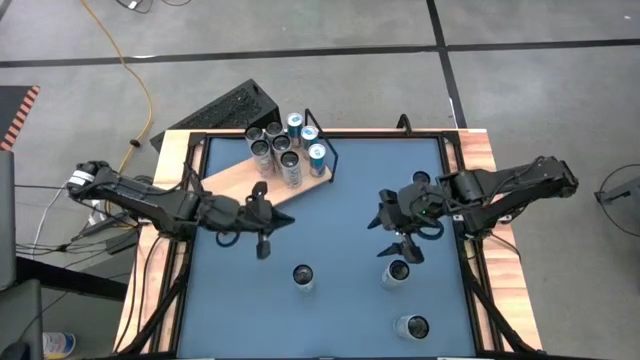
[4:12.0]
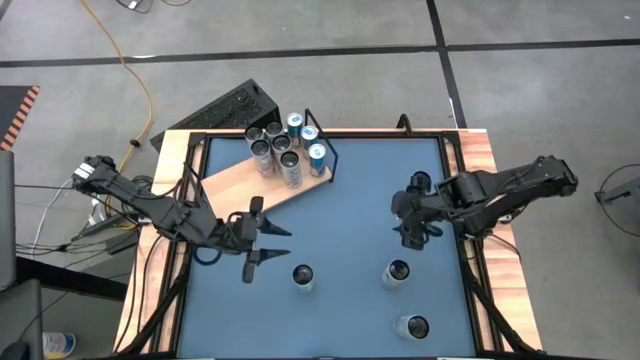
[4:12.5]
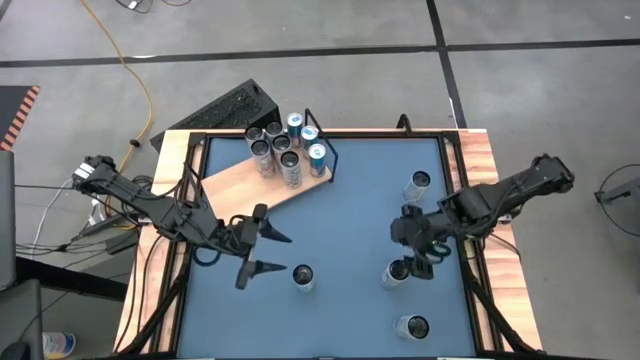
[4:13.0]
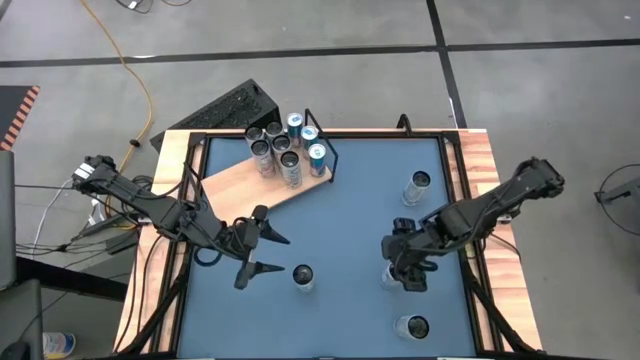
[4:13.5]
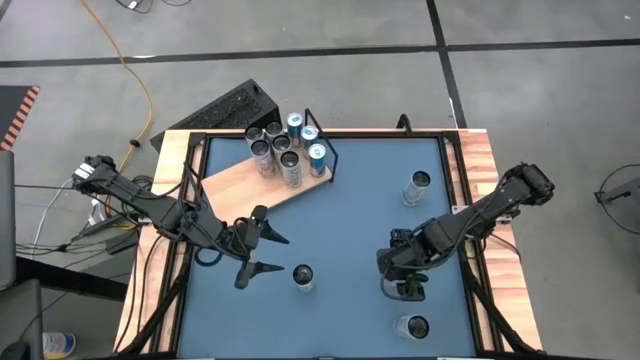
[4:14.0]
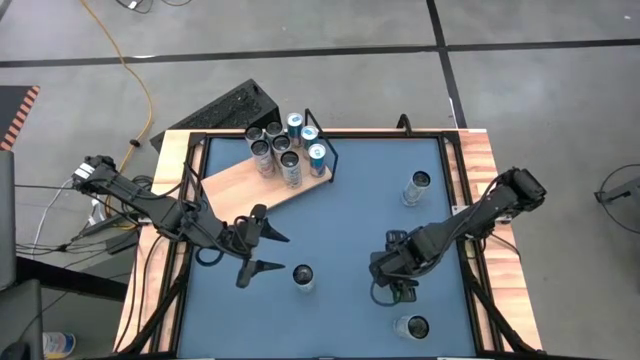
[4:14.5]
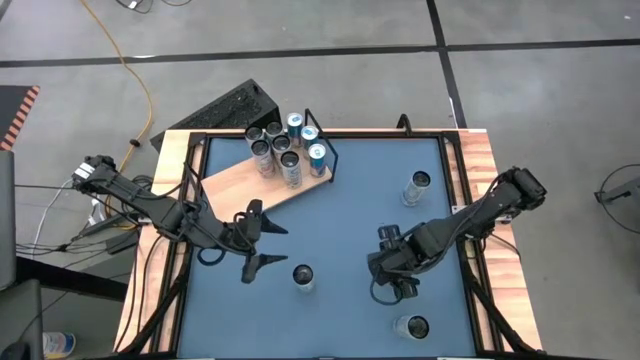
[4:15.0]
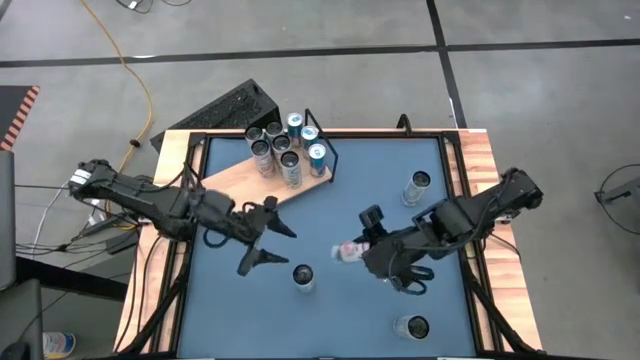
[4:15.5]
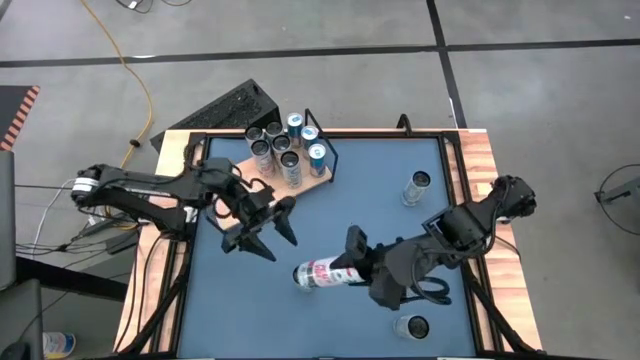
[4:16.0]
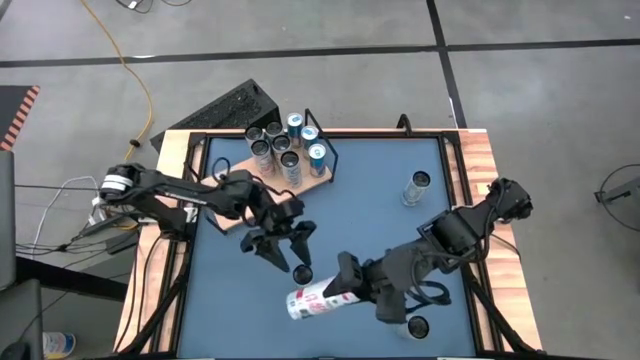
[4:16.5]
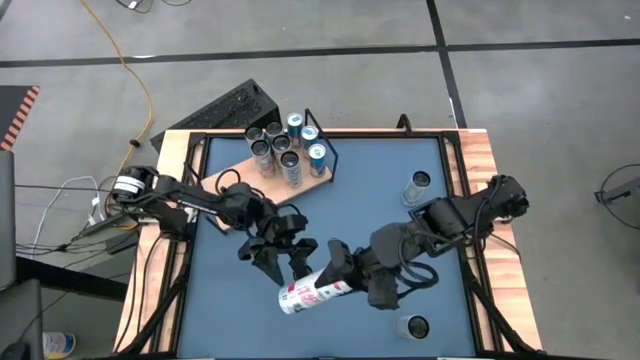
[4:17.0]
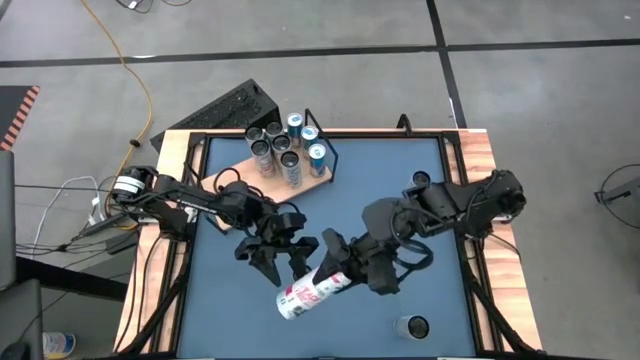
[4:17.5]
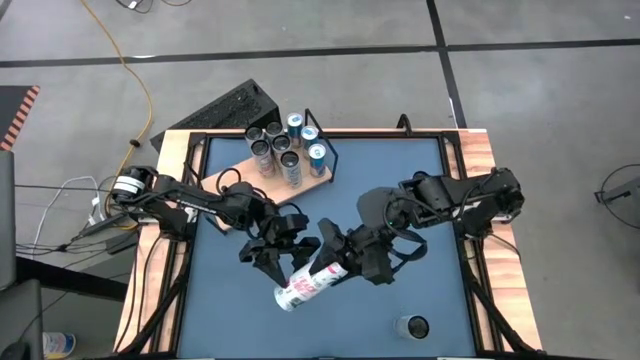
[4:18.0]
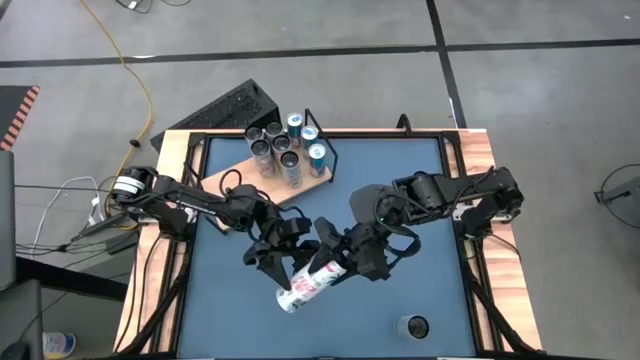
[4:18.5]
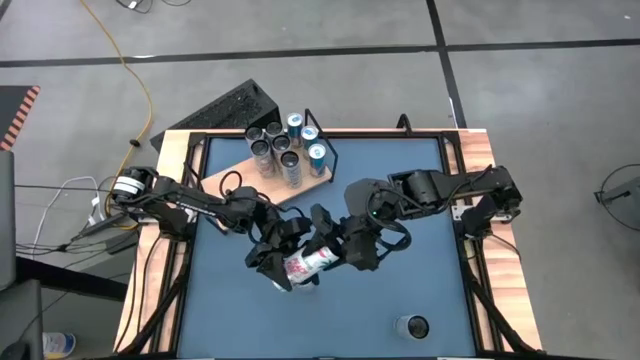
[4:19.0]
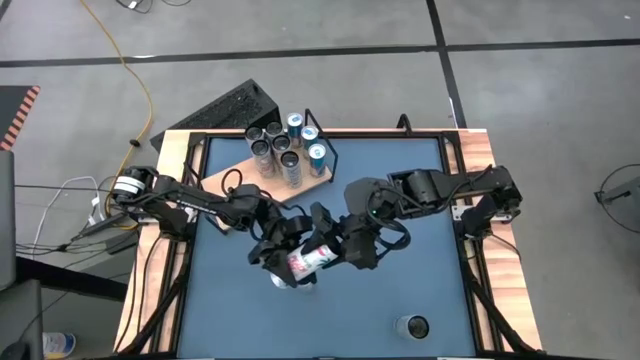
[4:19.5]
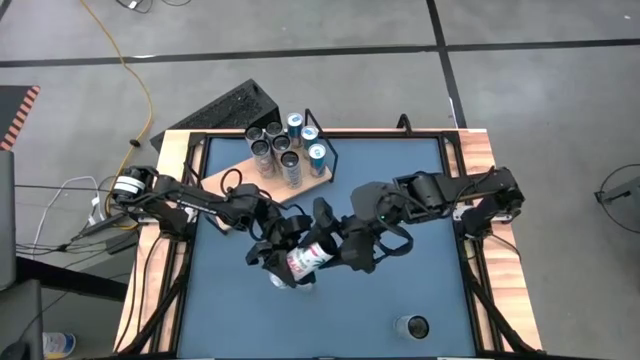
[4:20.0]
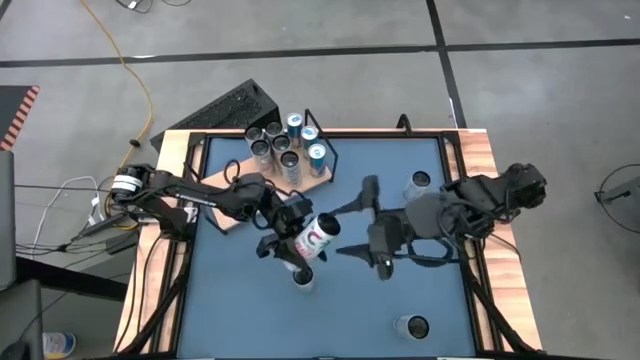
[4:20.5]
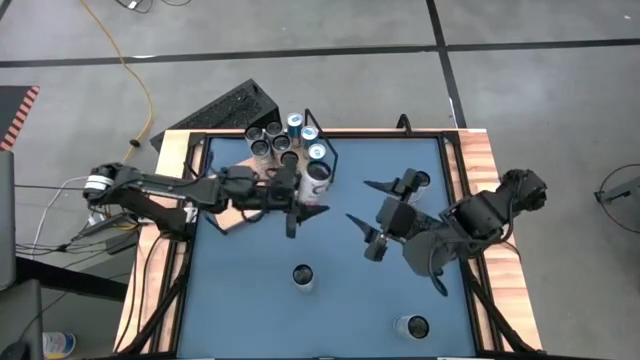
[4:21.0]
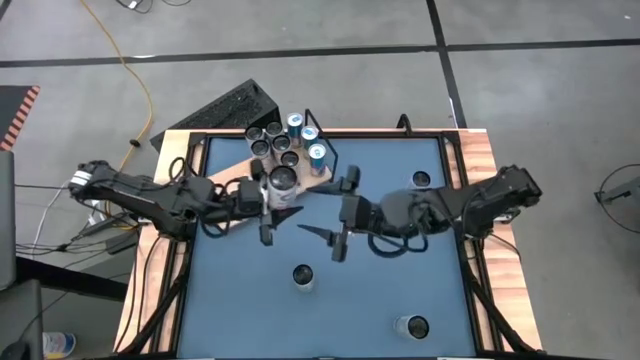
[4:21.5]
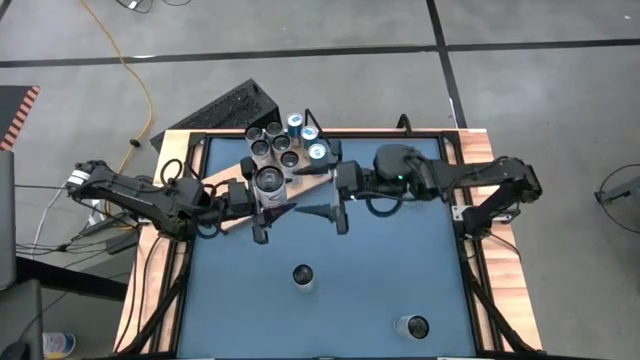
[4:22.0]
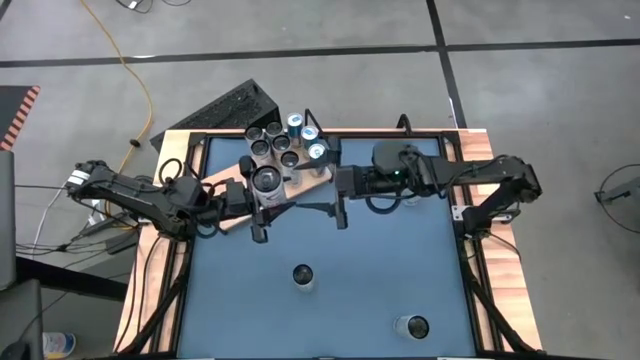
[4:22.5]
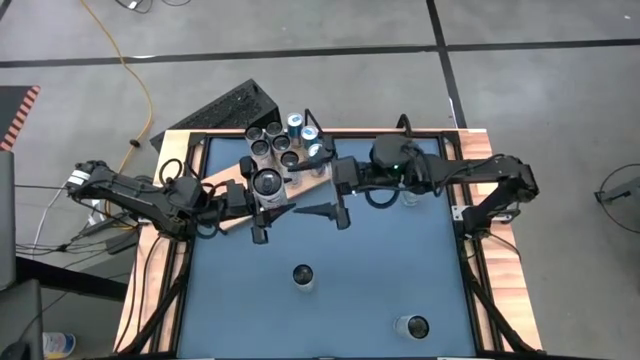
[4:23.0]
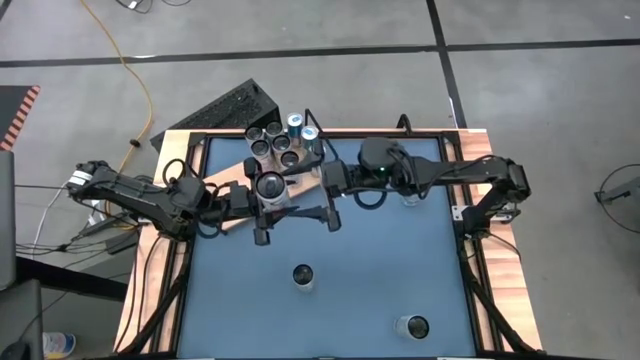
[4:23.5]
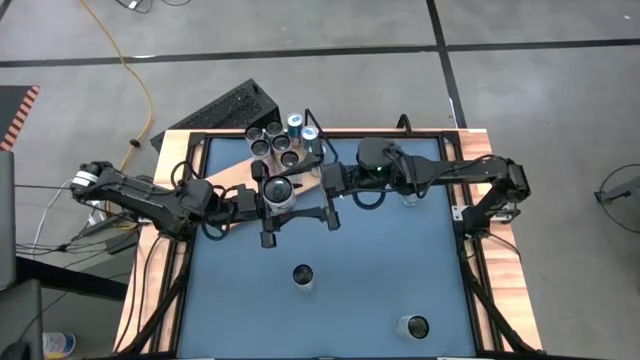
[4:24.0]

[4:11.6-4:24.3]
Task: Place canned beverage on shelf
Put the white and pink soda can on the shelf aligned with the other white and pink soda cans

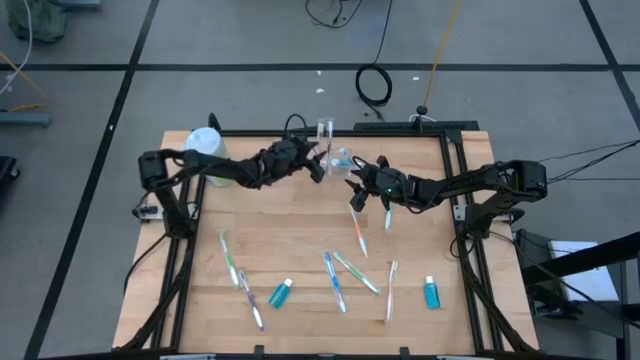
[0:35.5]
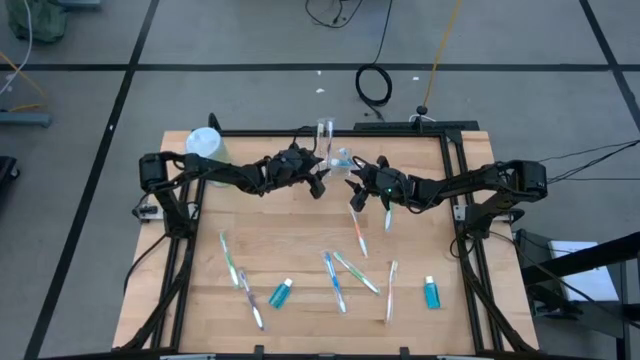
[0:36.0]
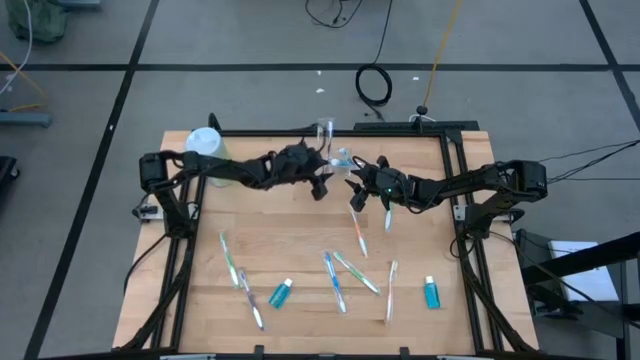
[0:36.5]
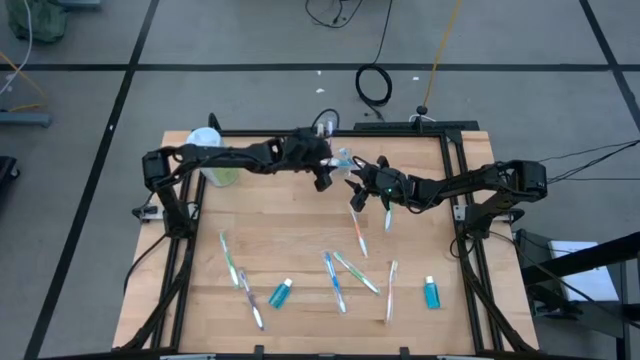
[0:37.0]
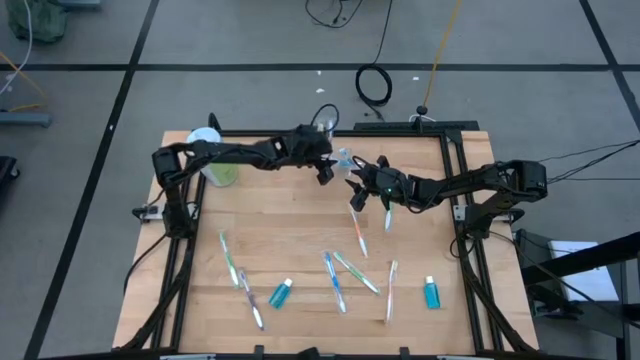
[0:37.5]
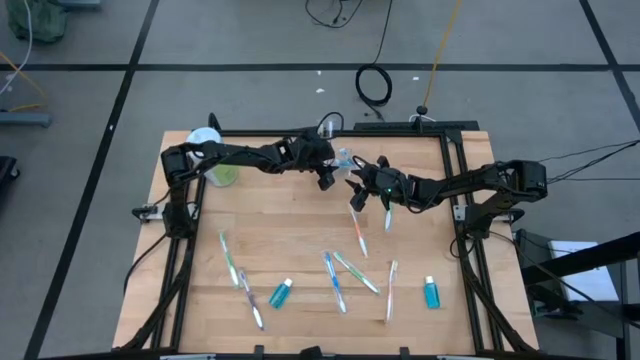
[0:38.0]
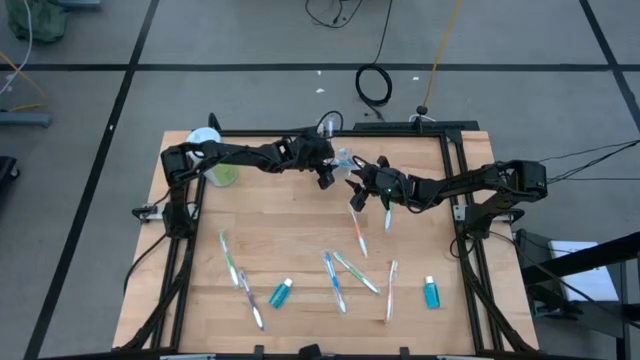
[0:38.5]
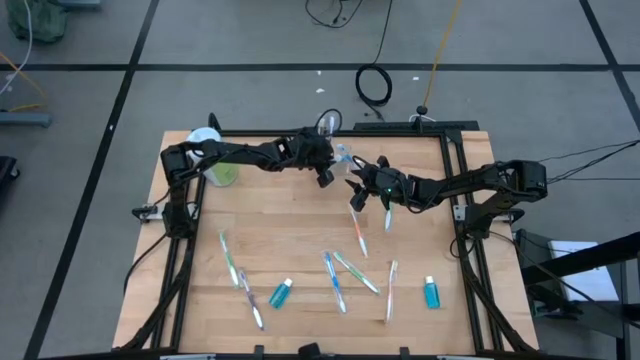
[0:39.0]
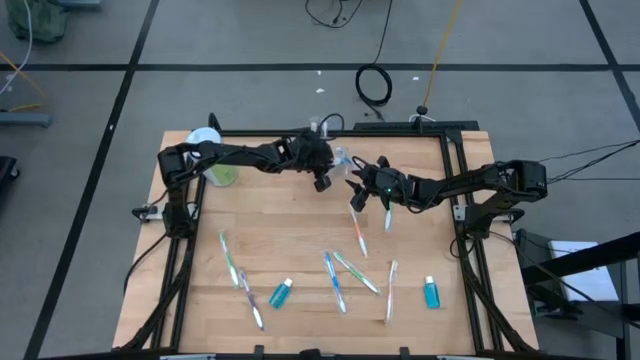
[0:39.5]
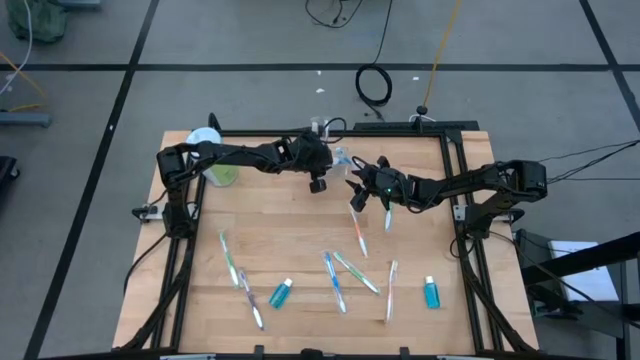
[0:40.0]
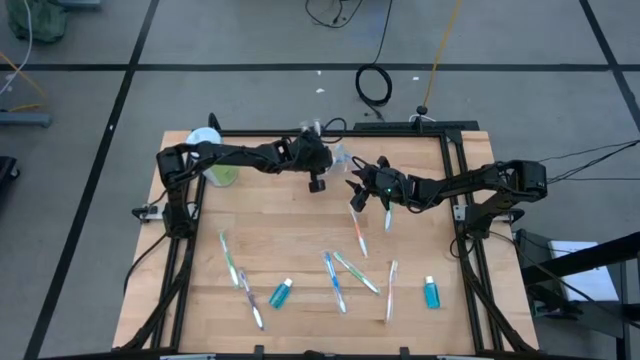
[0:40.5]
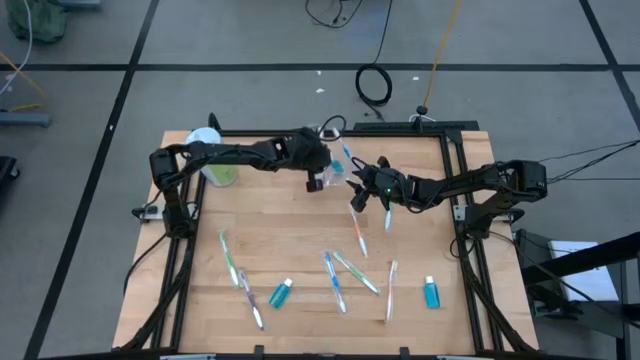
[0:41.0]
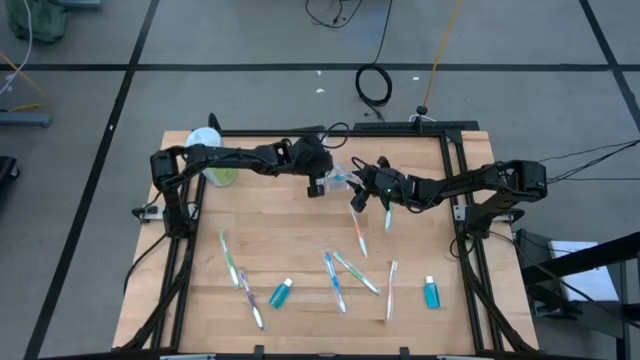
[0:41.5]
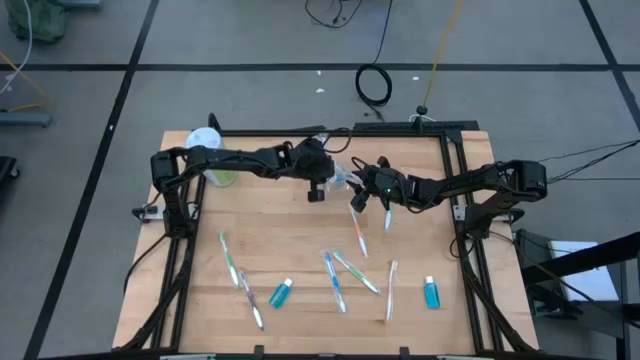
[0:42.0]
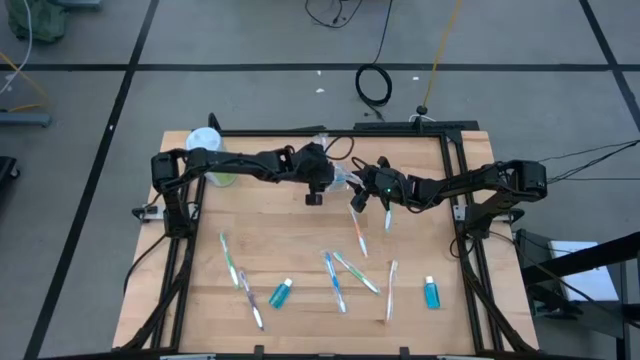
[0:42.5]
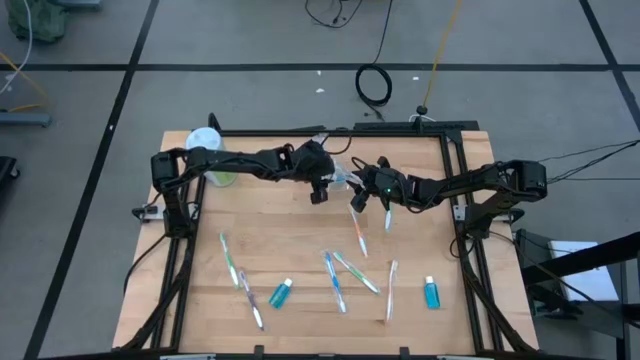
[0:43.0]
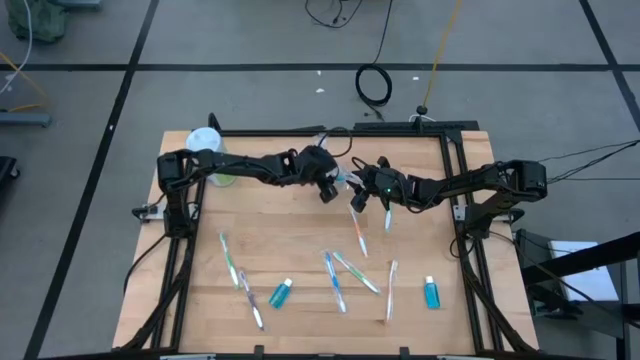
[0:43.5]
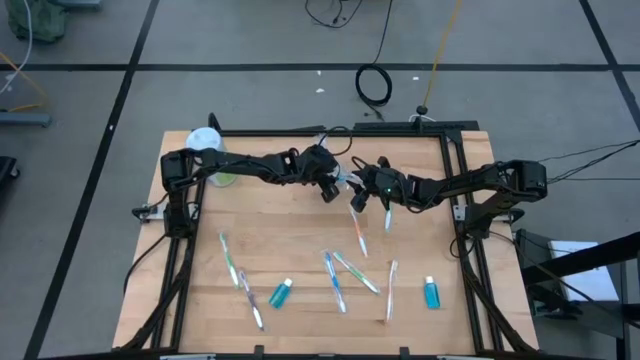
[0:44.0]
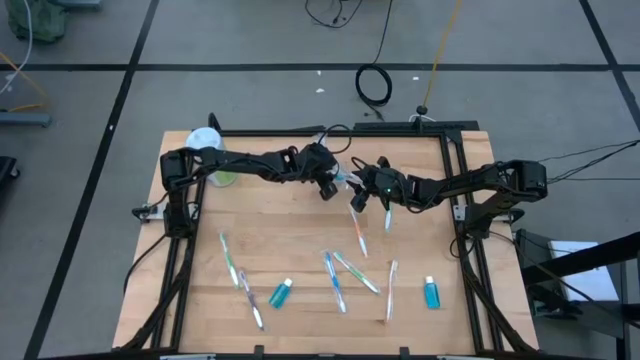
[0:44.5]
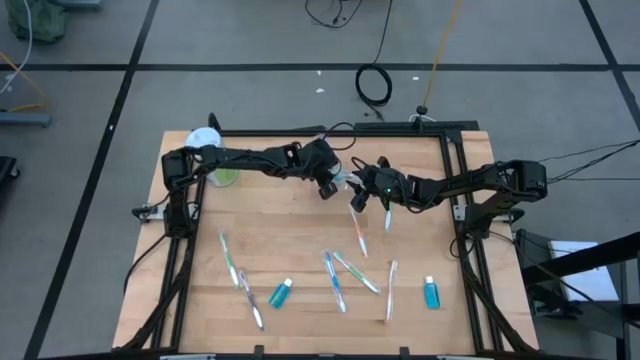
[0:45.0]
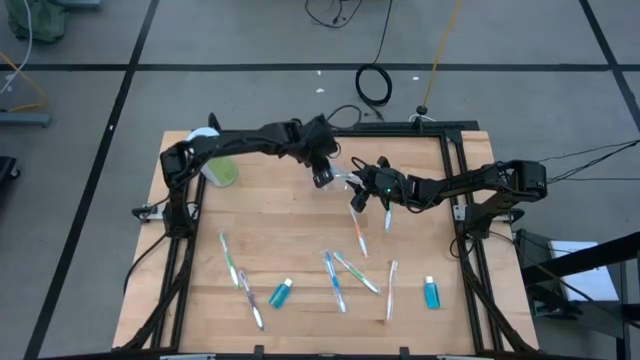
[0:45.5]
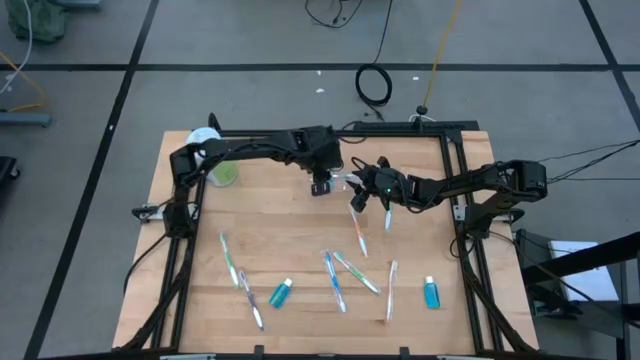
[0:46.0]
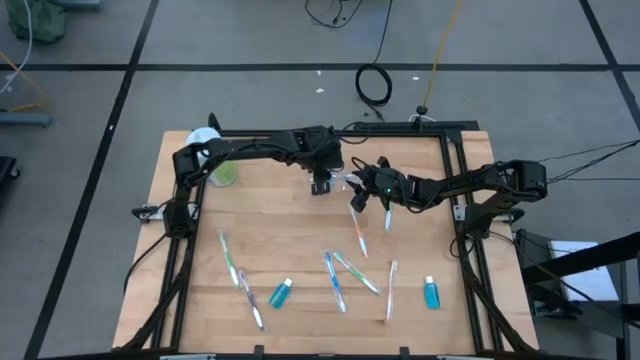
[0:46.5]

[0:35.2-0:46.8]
Task: Pick & Place toothbrushing station
Adjust the blue mouthwash in the transparent organizer
